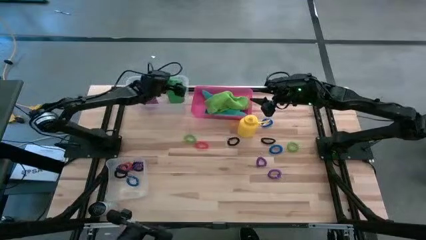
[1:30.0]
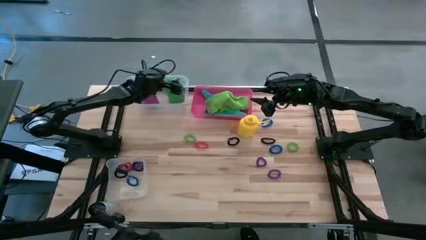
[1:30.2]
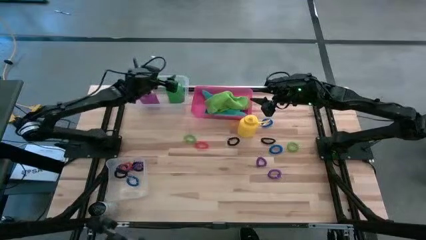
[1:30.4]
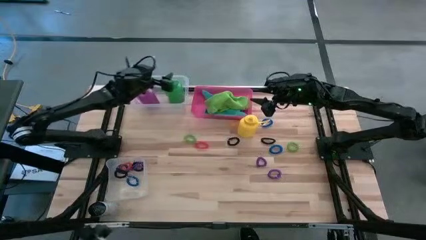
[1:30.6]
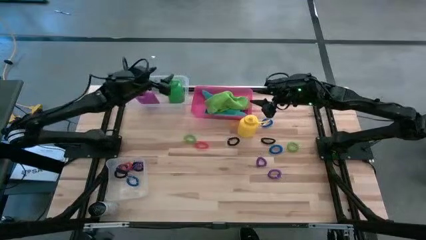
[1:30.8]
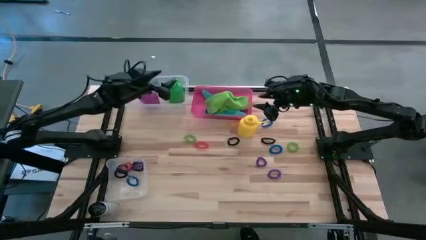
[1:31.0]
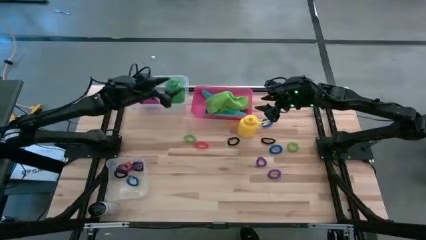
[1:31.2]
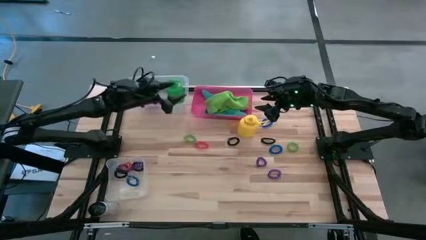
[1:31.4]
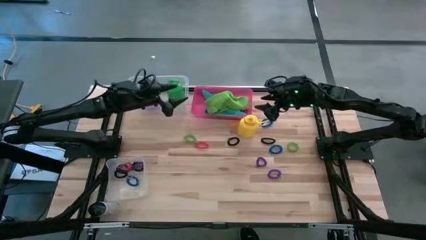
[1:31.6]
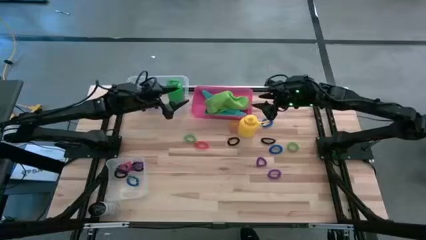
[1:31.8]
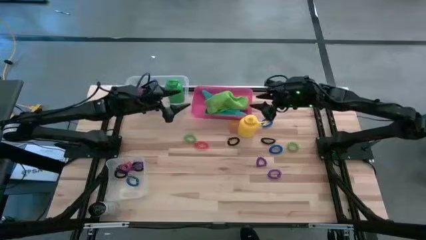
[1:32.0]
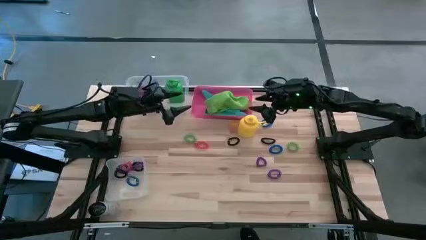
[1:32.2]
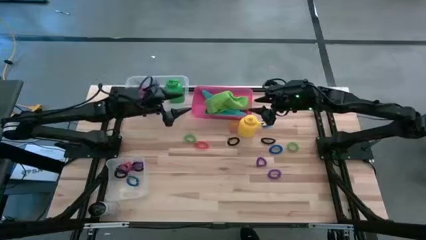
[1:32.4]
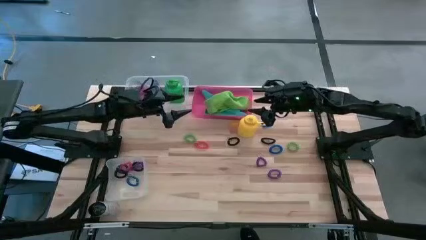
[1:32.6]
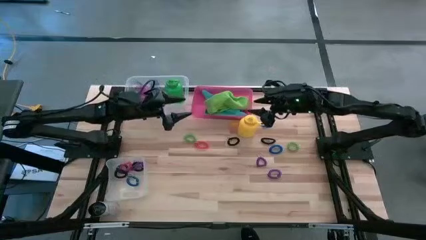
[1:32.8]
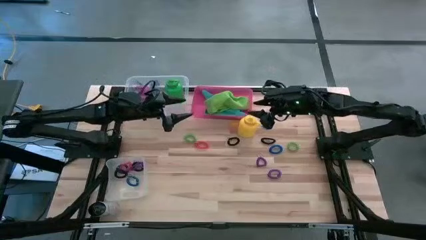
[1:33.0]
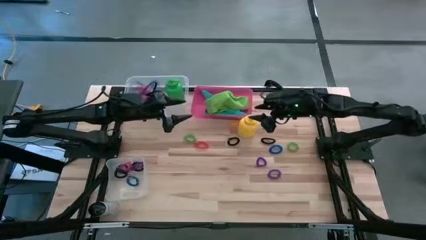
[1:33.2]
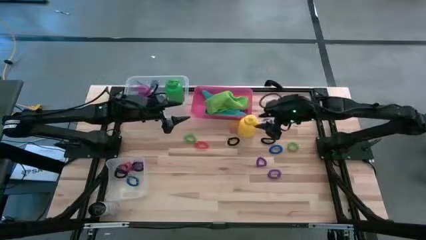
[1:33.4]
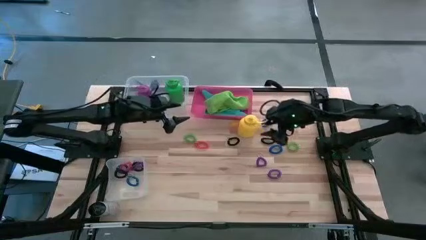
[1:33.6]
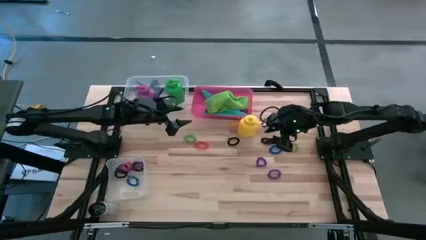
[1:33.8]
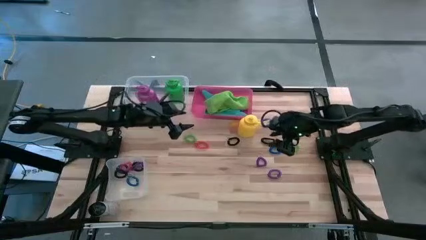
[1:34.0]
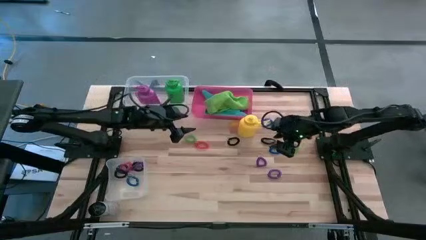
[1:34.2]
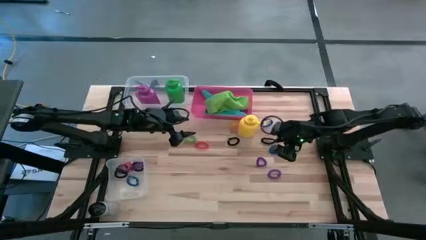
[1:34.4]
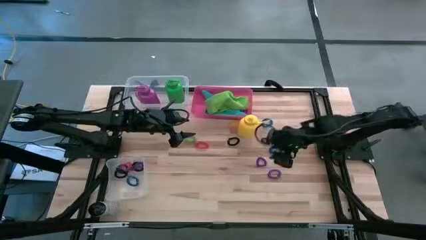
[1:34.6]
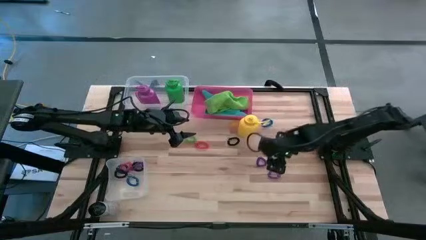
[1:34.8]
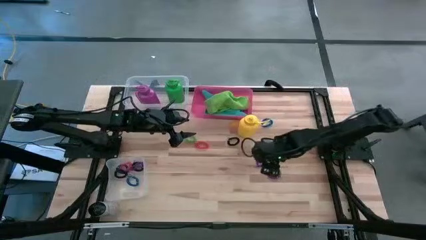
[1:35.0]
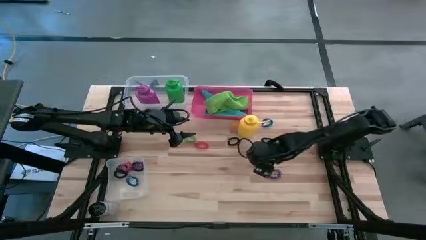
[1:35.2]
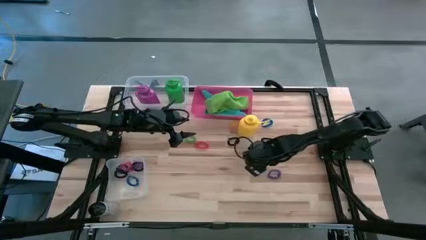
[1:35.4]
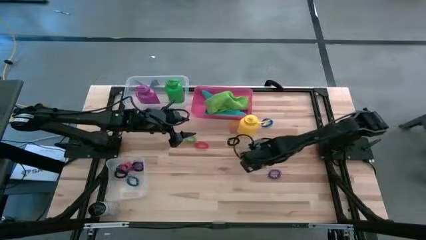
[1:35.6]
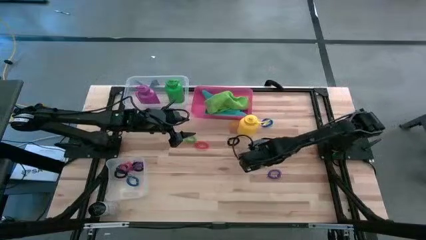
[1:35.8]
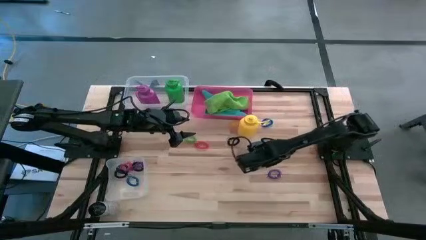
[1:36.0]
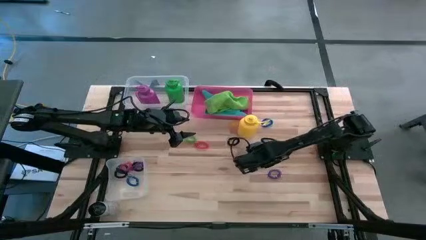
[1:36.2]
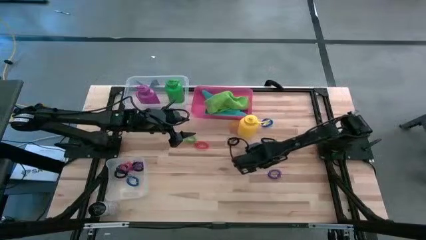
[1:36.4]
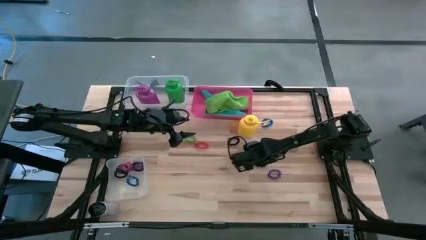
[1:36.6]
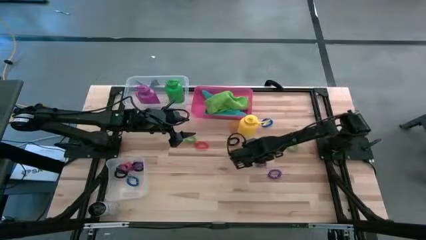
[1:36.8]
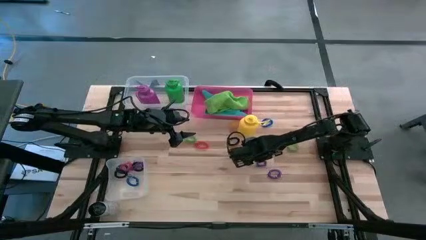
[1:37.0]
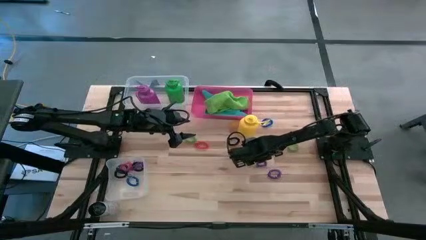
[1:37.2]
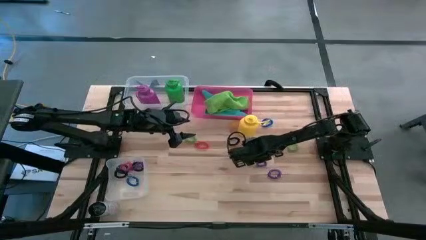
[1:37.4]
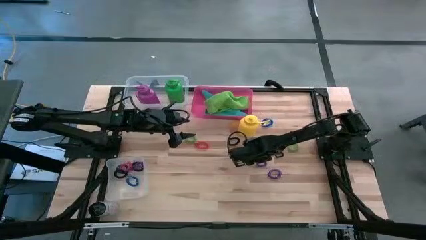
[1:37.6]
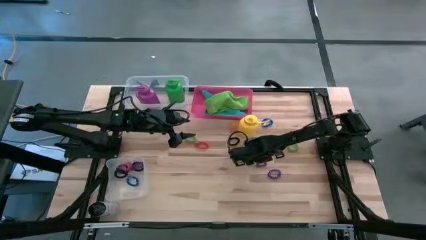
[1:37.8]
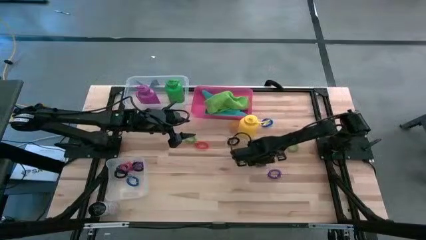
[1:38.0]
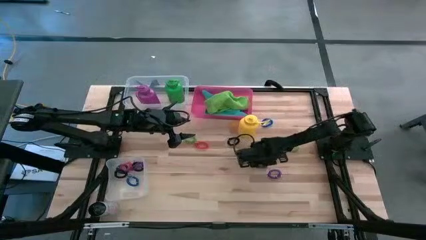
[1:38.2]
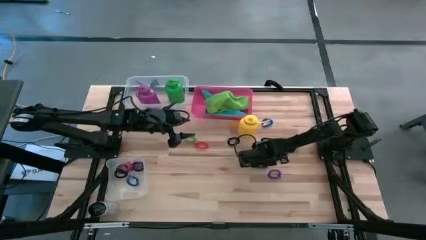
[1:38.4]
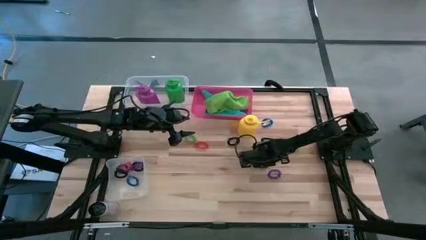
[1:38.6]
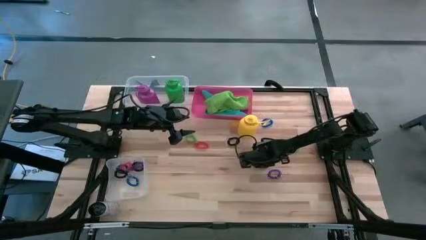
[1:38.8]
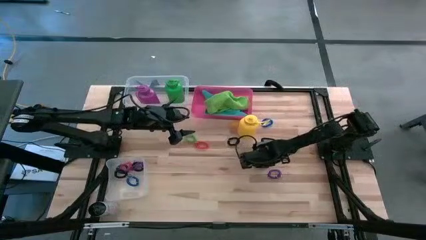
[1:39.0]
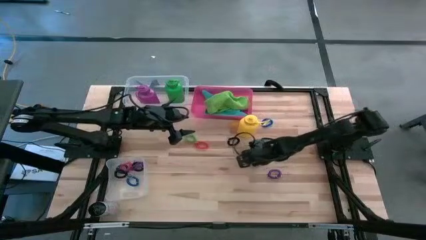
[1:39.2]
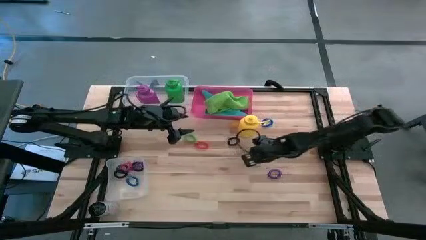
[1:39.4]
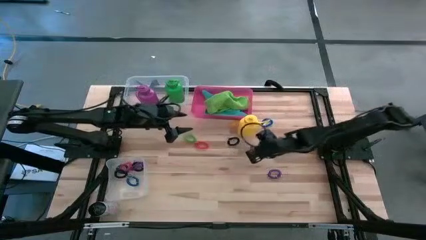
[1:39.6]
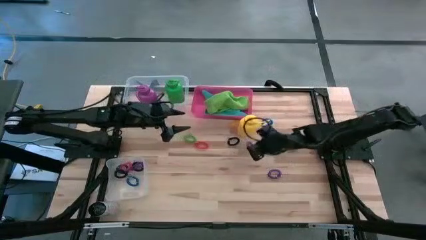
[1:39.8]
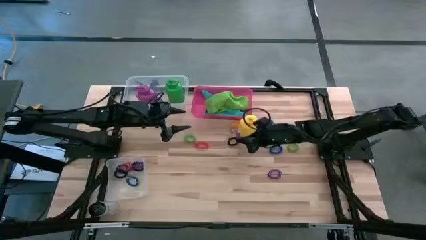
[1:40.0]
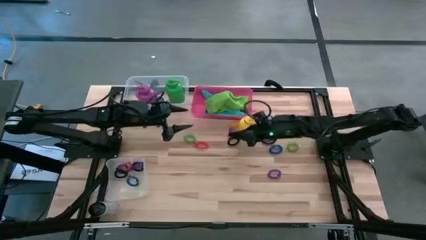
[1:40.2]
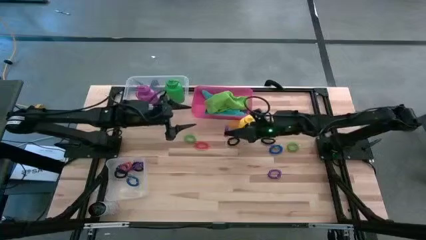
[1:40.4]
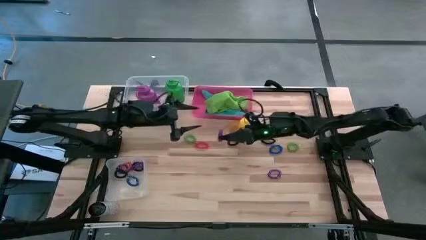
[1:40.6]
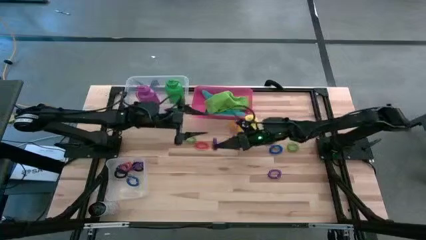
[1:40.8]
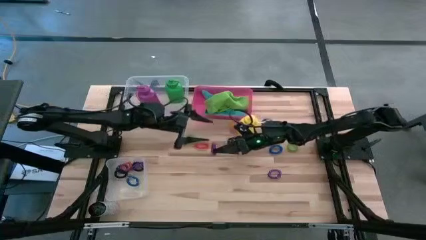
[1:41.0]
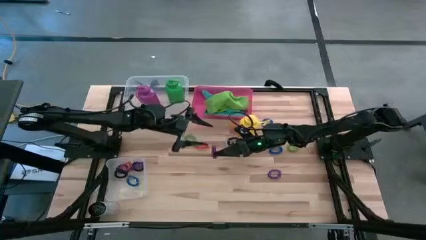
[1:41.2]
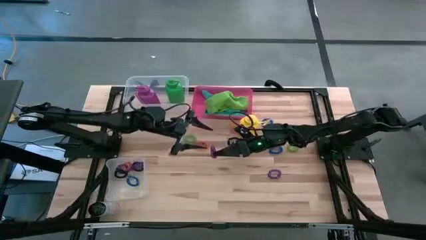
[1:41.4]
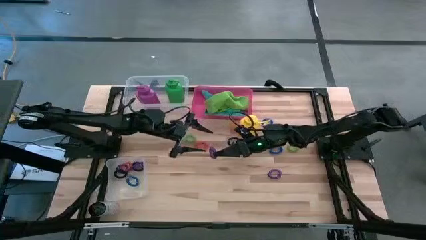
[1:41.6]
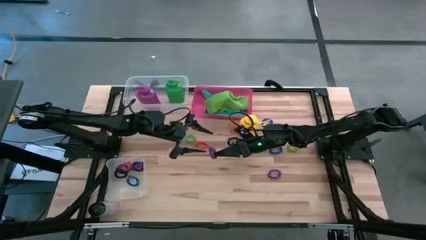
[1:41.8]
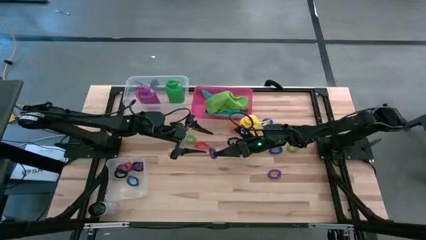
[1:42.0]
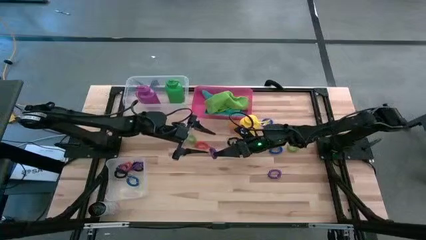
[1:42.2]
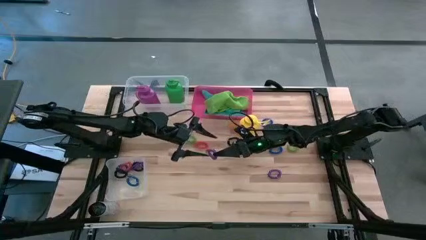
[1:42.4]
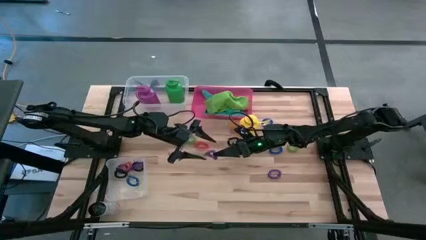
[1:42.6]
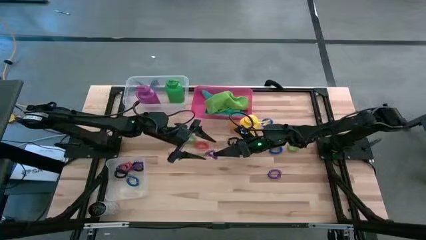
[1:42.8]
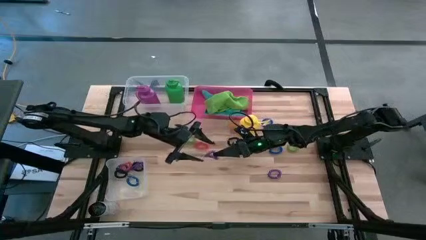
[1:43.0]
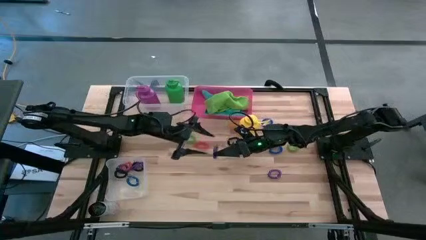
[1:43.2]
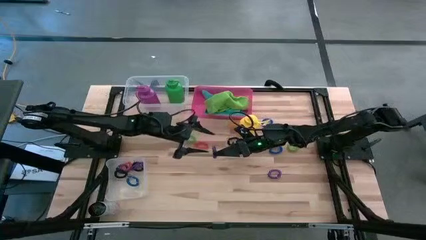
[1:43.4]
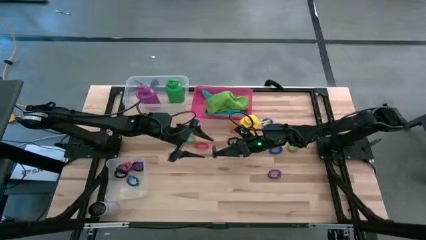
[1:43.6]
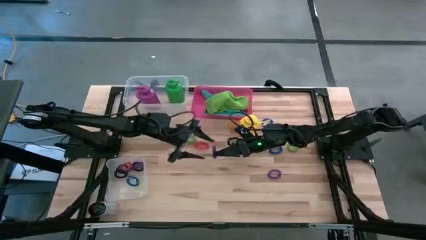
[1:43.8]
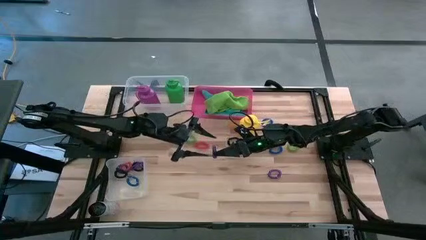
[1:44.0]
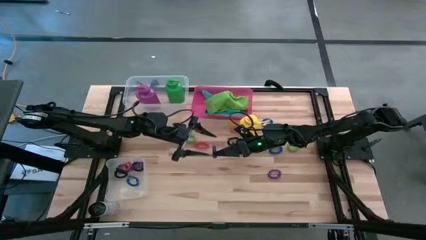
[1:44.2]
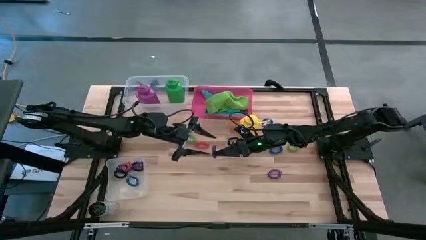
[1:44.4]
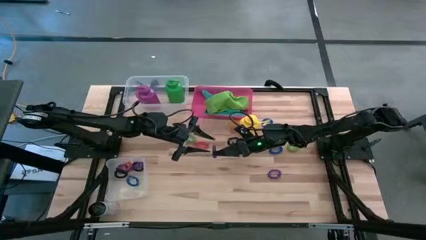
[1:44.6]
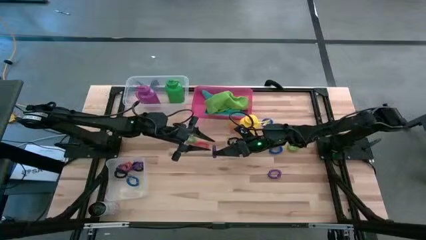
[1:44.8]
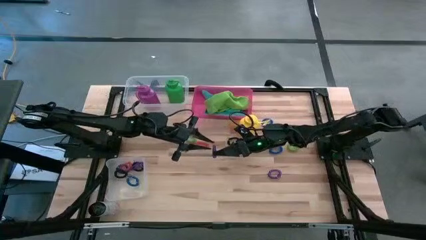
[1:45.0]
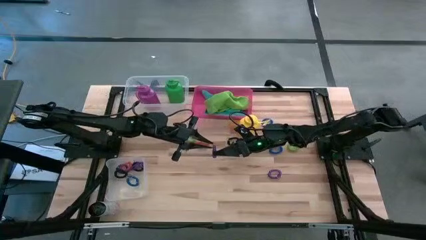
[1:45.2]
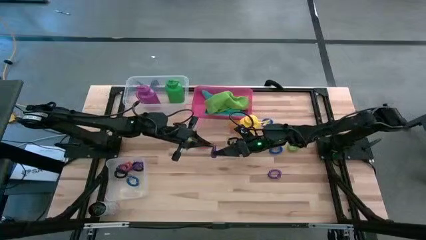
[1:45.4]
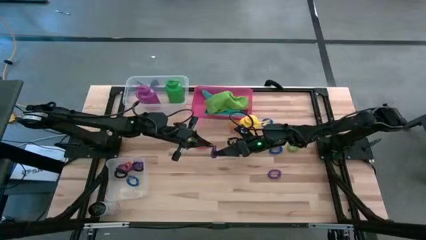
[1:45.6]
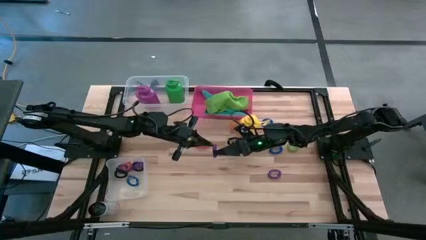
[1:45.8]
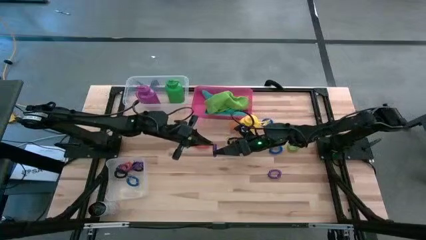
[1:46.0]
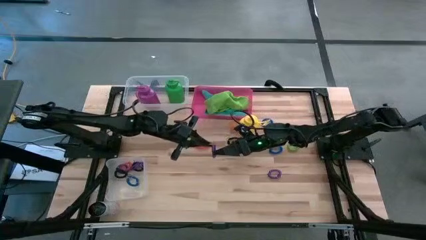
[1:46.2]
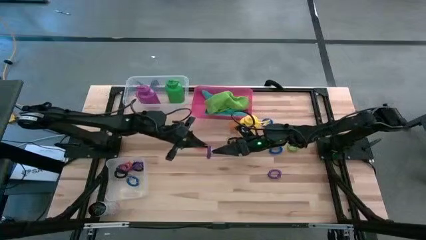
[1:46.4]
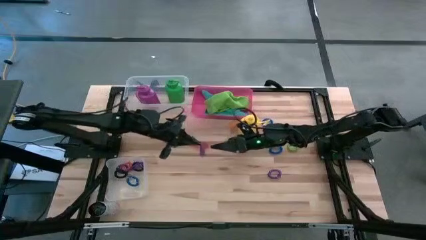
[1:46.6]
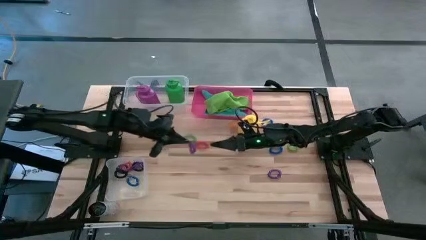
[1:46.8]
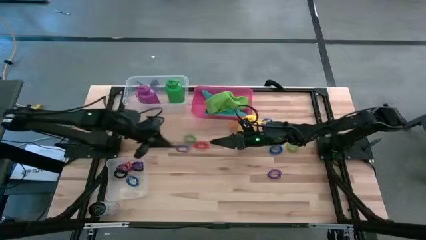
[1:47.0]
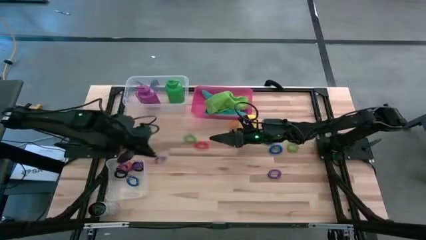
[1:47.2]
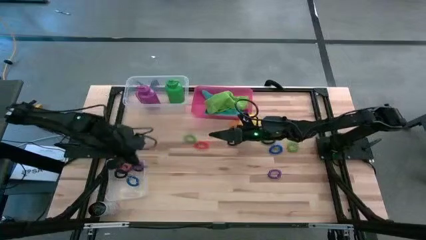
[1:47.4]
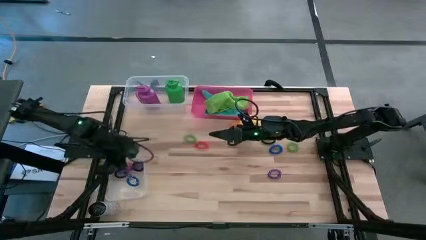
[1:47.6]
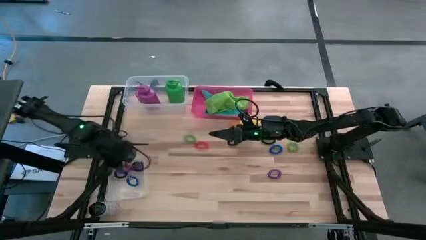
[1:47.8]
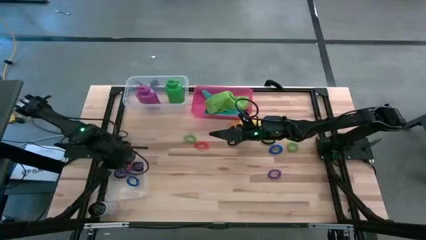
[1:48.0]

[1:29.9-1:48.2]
Task: Pick & Place Sports Items
Put the purple spring keychain into the bottom transparent bin
